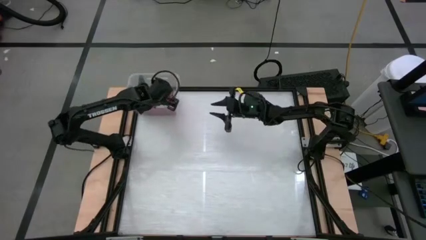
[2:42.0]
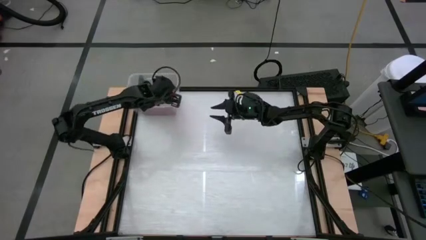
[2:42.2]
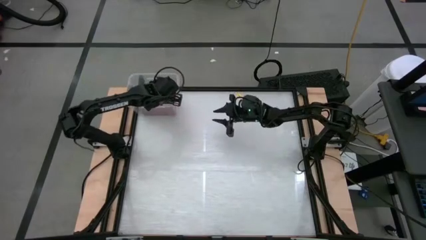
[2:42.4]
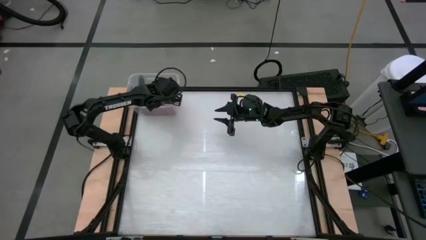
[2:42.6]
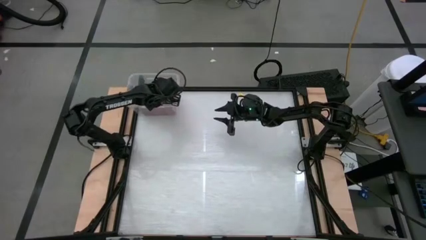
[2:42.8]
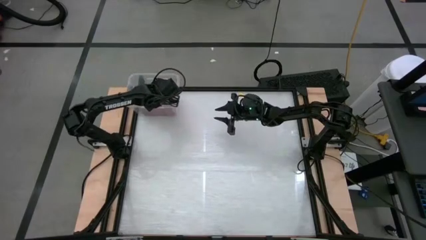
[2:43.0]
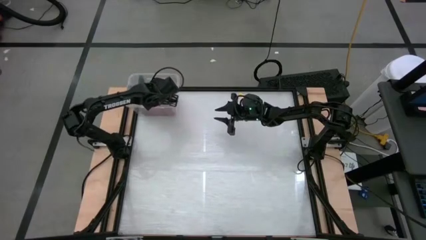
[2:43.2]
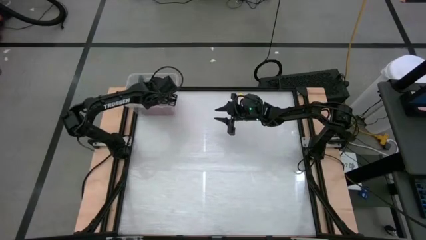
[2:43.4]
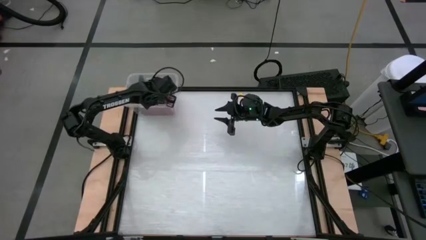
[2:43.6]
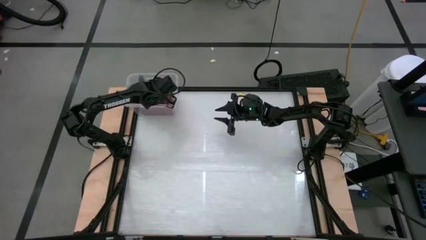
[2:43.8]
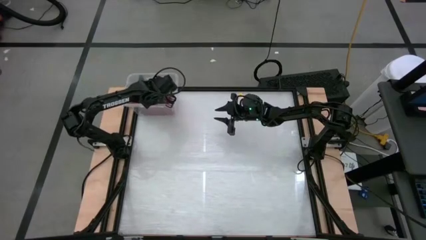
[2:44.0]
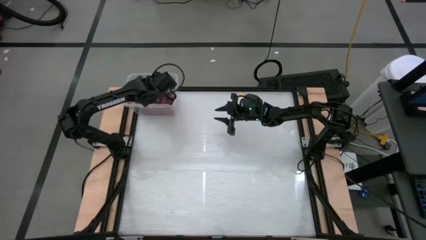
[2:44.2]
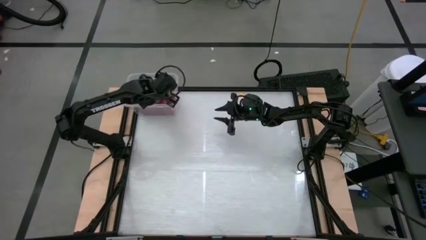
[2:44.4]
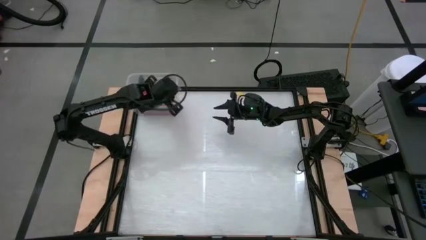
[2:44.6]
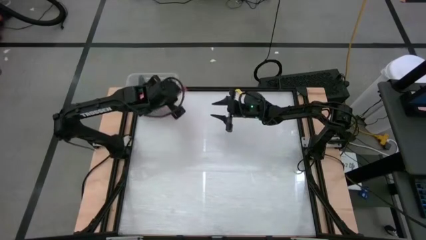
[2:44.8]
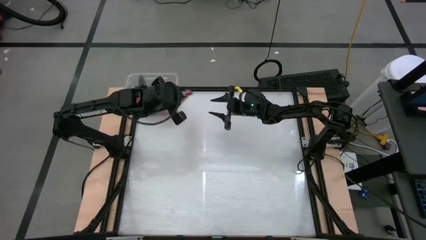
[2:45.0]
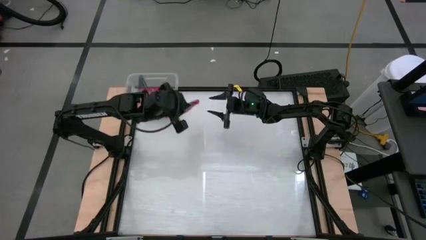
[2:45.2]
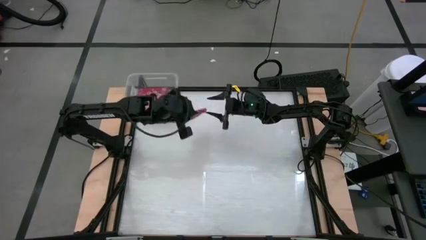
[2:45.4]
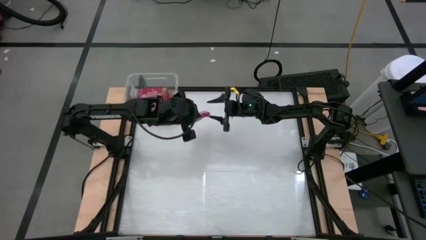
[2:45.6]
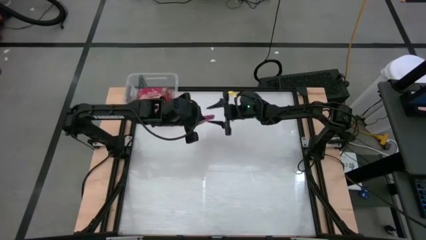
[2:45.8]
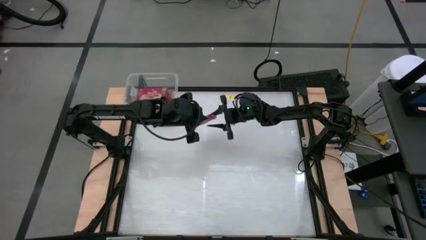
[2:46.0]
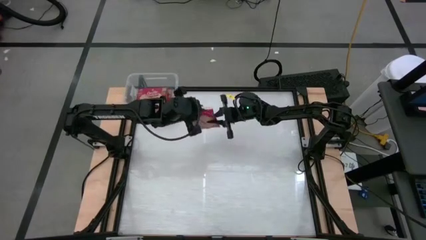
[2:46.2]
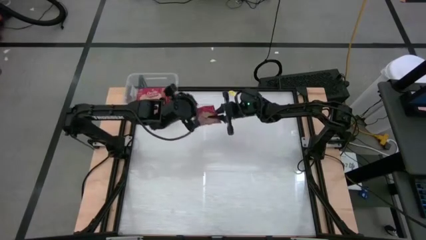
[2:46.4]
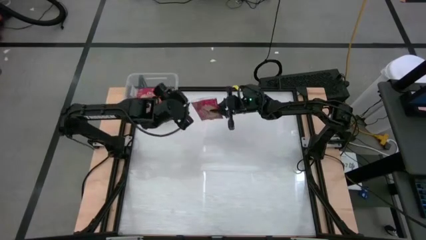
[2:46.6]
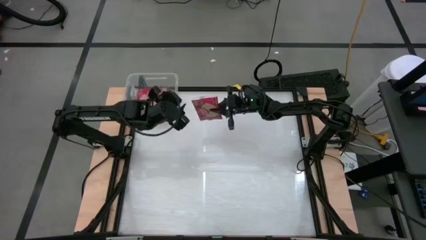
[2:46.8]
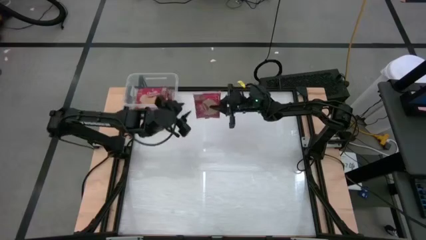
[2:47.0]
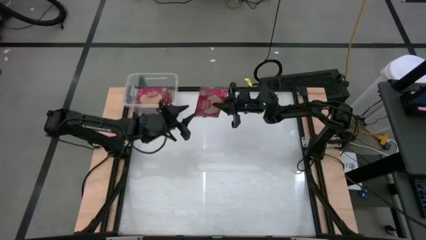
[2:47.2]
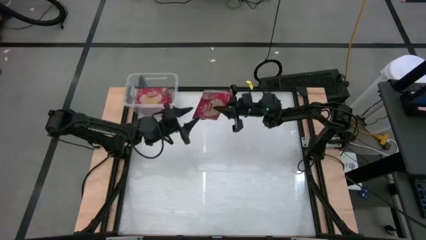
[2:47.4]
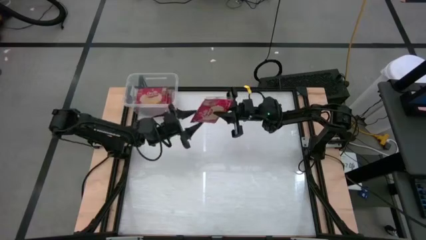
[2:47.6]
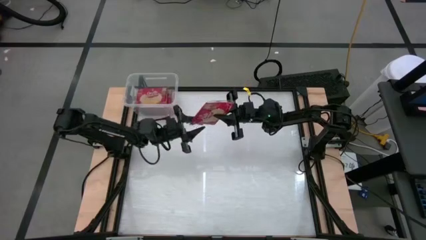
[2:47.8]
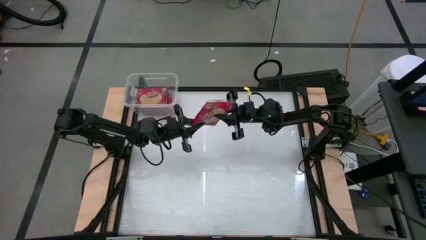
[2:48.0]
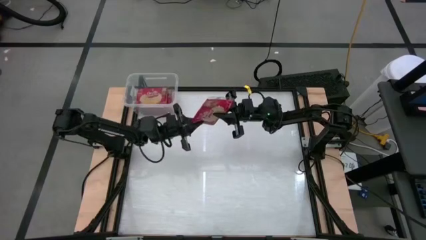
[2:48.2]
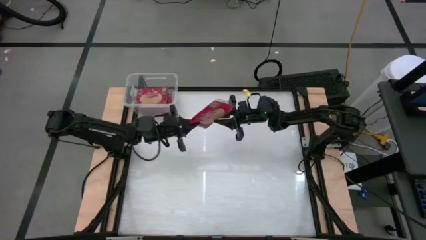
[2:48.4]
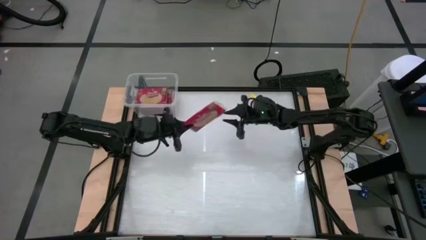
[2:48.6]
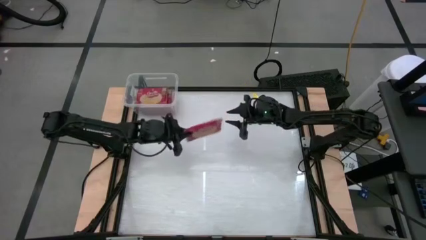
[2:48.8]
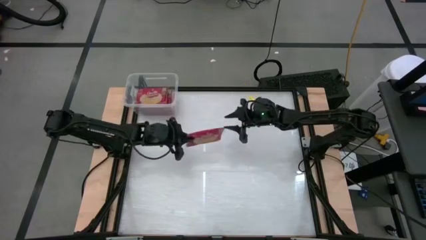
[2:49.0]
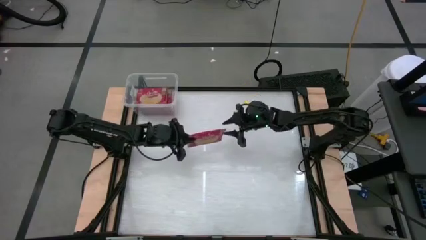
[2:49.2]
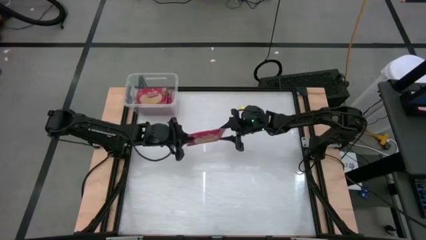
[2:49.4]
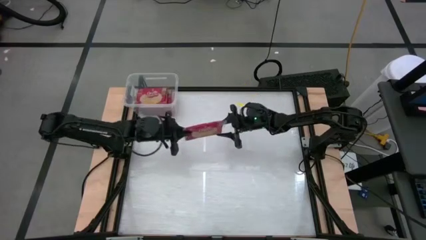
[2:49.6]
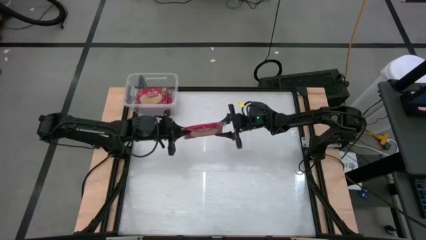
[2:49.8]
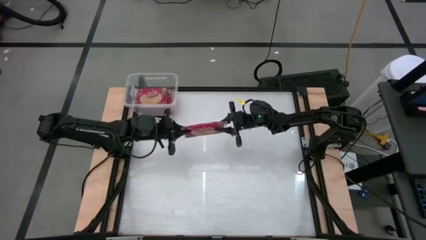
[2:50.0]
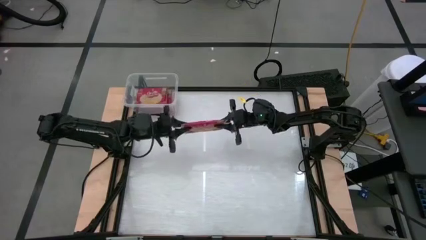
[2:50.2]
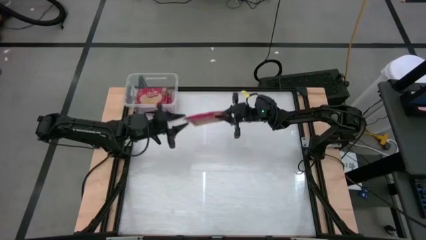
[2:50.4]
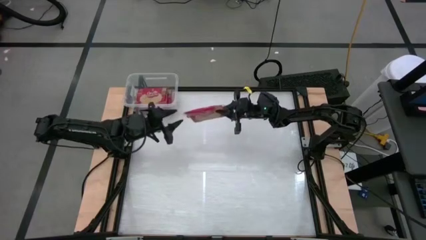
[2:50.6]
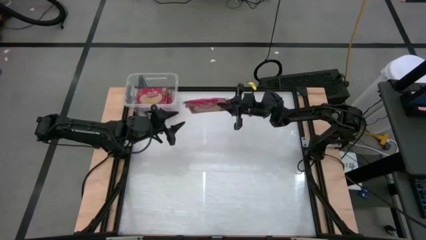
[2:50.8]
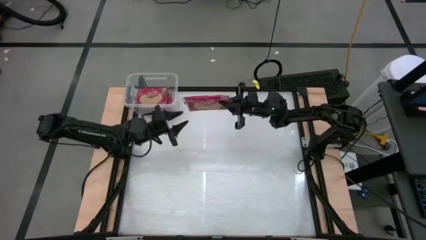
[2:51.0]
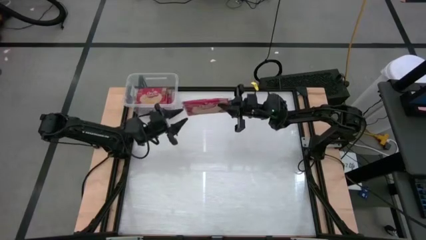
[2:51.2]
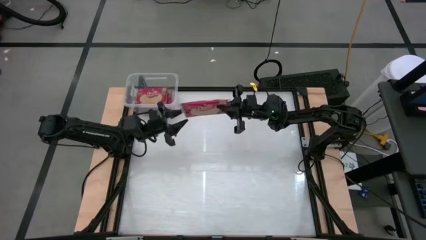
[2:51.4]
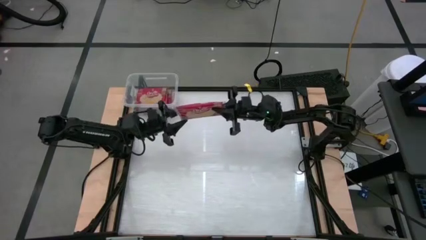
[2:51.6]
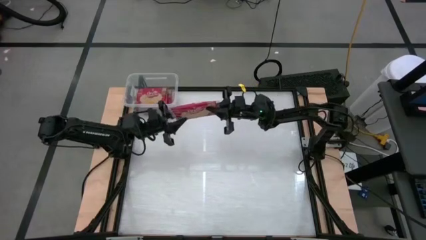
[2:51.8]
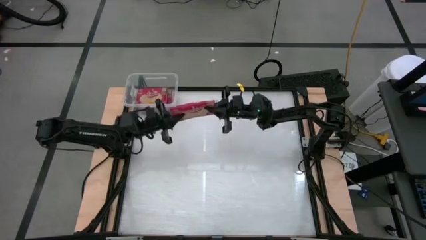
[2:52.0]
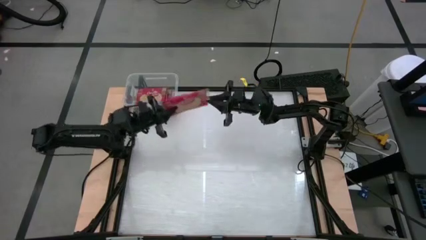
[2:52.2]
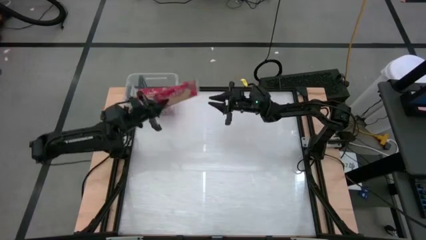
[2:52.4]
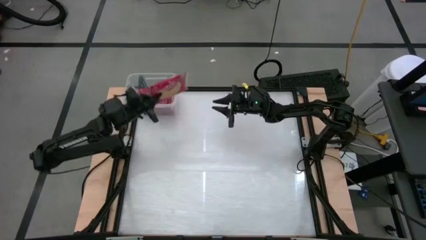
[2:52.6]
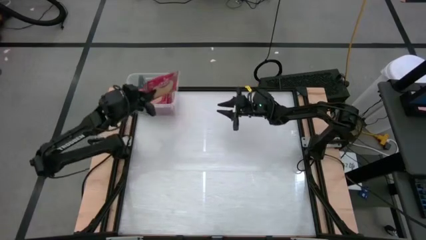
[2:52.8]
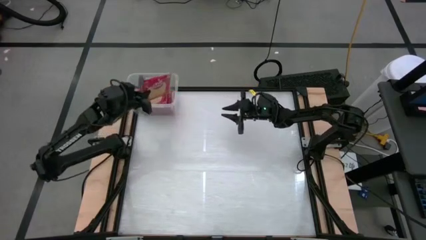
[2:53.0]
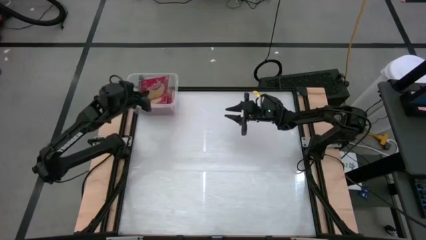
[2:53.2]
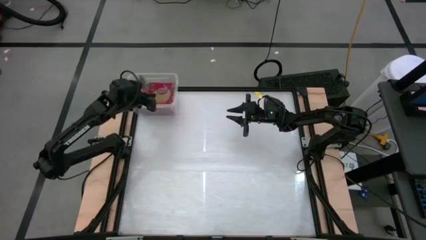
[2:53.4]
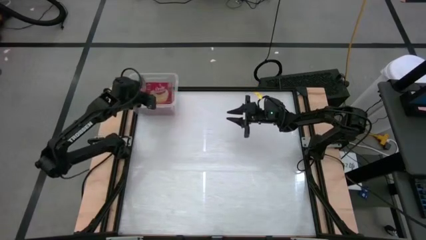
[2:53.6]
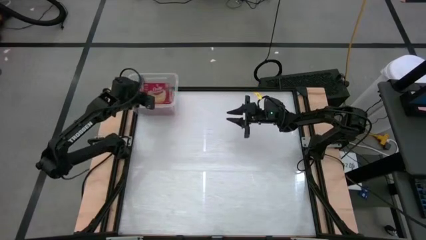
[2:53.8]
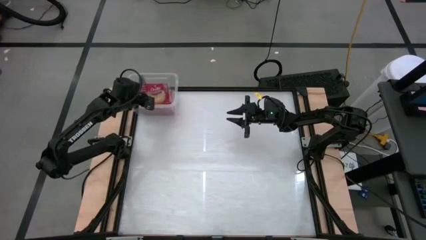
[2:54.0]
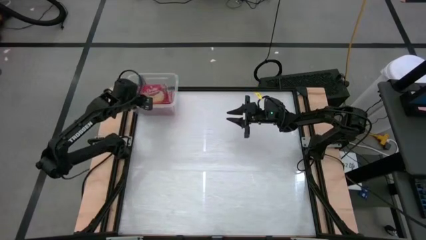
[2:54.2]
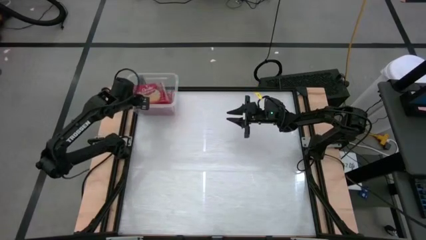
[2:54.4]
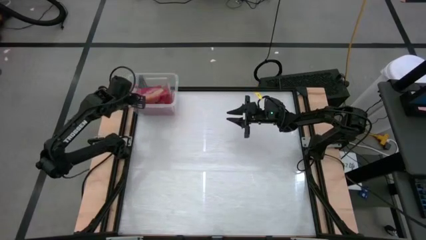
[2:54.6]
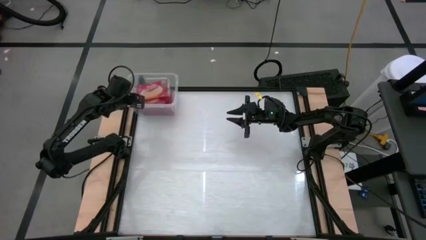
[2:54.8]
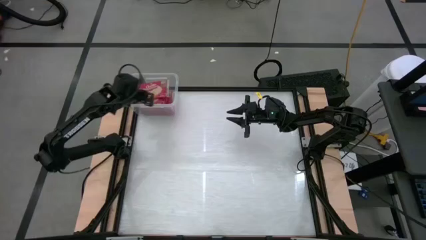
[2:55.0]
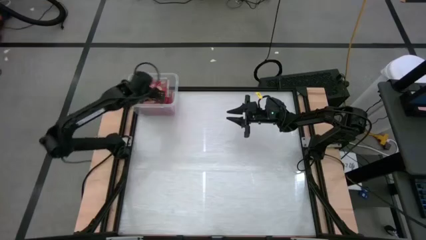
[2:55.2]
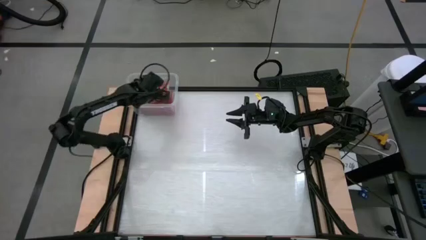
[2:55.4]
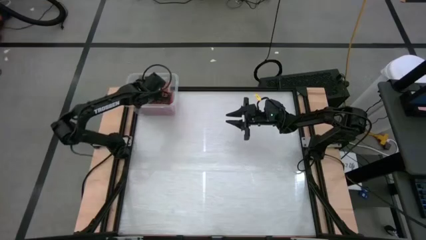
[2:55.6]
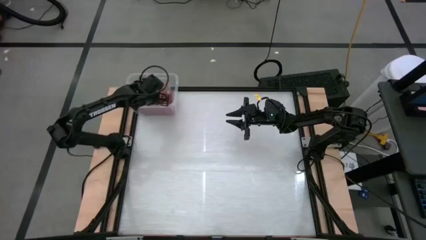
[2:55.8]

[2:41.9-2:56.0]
Task: Sort popcorn bags into baskets
Put the red popcorn bag into the transparent container

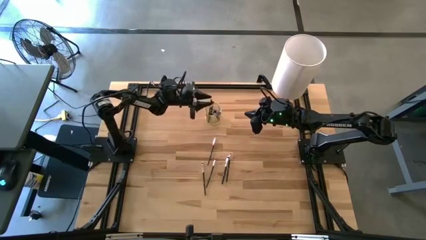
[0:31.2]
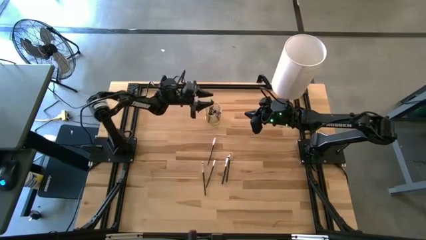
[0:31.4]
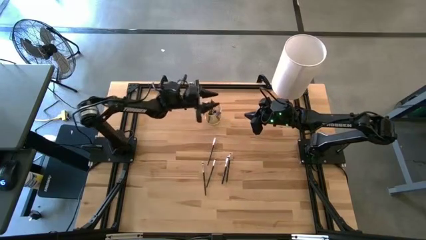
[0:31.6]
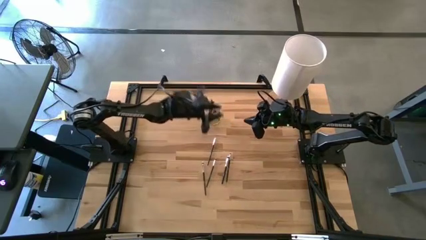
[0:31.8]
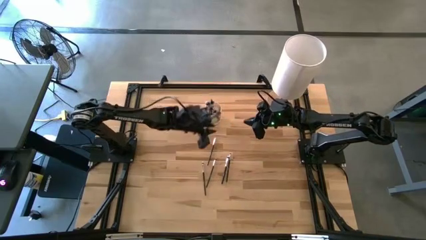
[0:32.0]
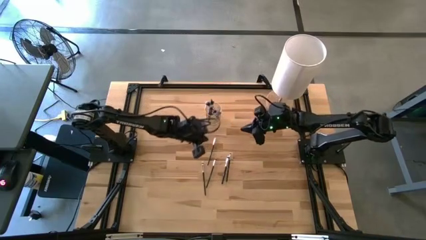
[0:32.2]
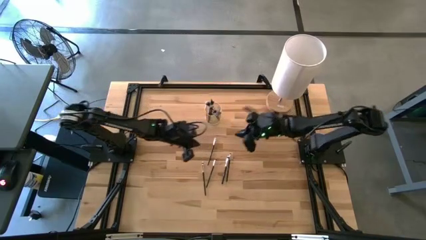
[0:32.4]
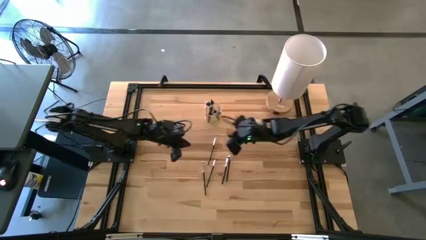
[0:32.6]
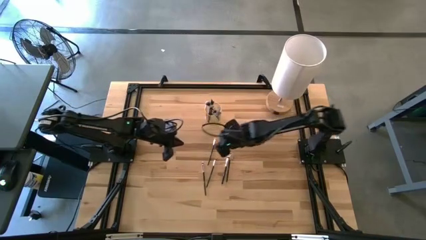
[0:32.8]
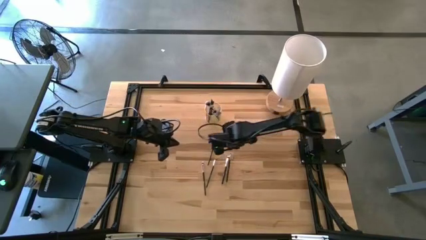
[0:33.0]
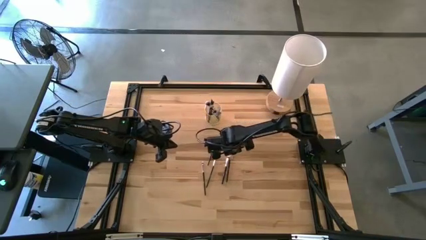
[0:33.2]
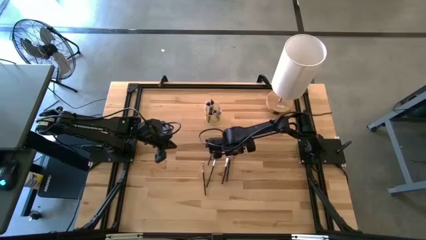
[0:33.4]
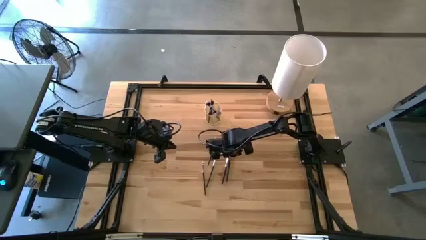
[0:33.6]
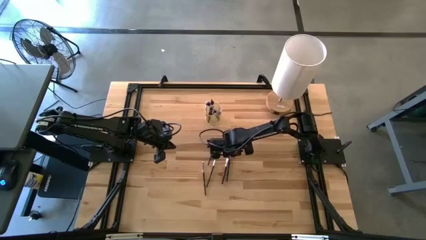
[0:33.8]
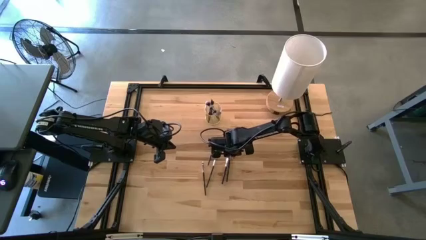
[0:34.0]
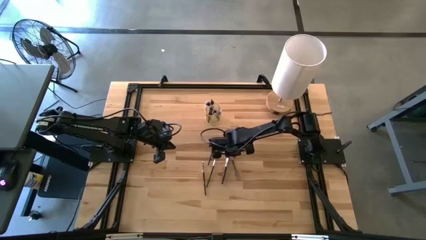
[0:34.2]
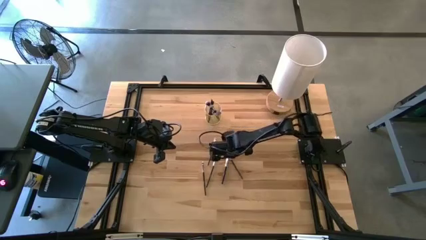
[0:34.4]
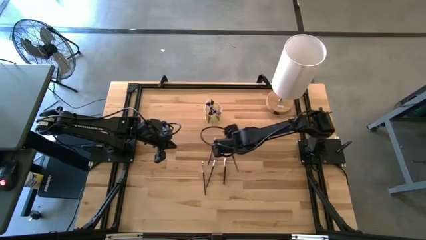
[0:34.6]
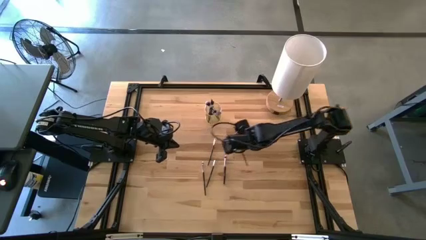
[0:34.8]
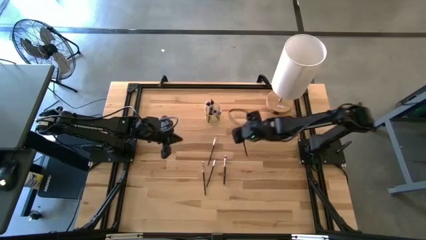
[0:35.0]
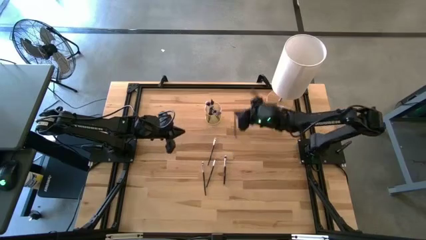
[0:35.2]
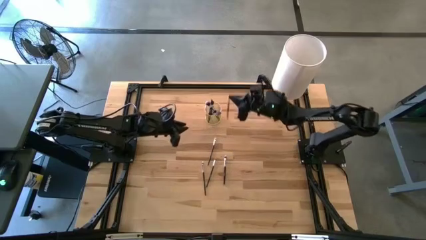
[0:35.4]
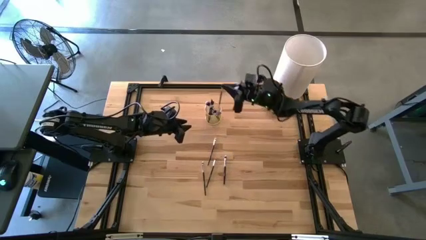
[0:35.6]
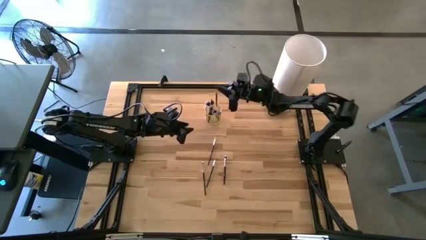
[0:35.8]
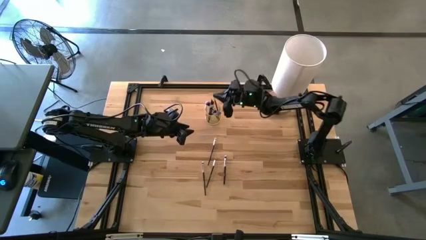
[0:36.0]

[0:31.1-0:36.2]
Task: Put items in baskets/containers
Put the eyeshadow brush into the pen holder
